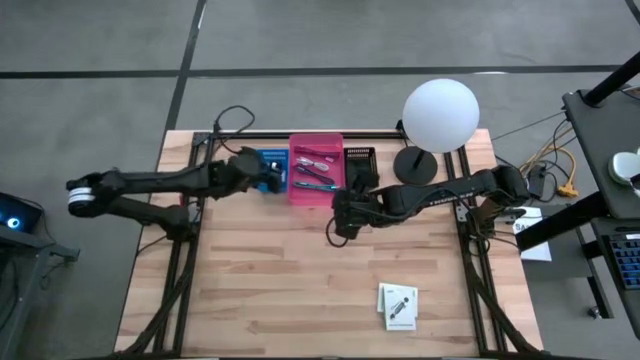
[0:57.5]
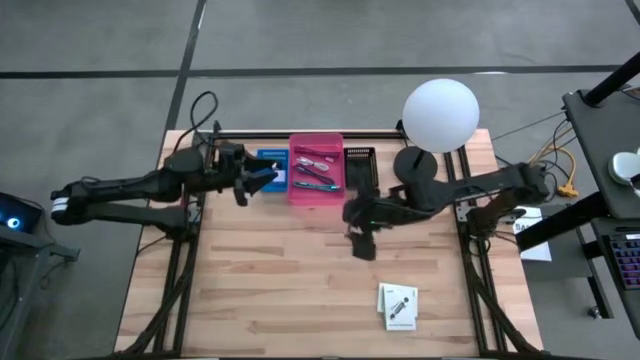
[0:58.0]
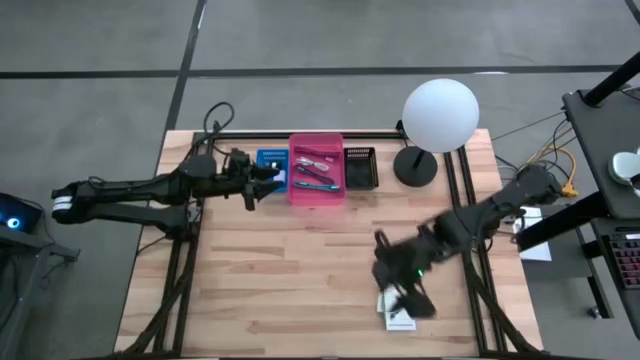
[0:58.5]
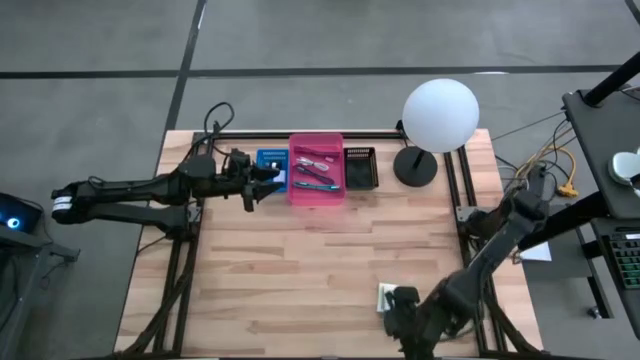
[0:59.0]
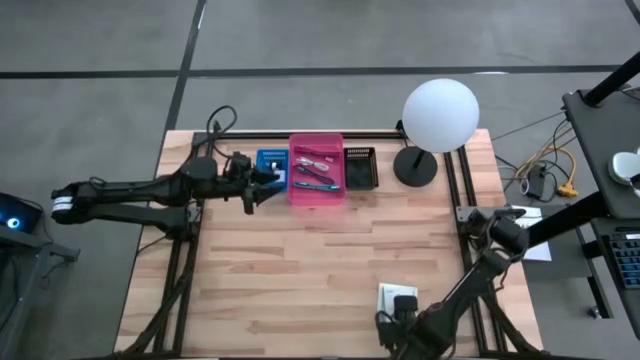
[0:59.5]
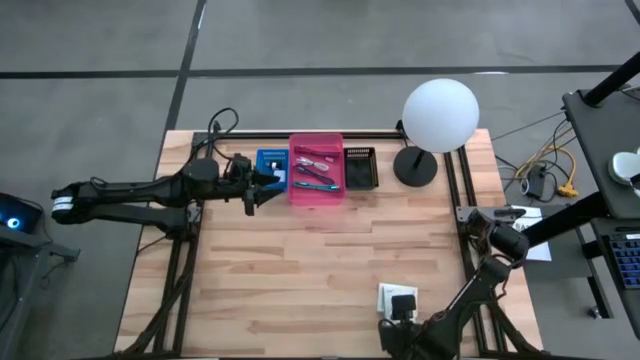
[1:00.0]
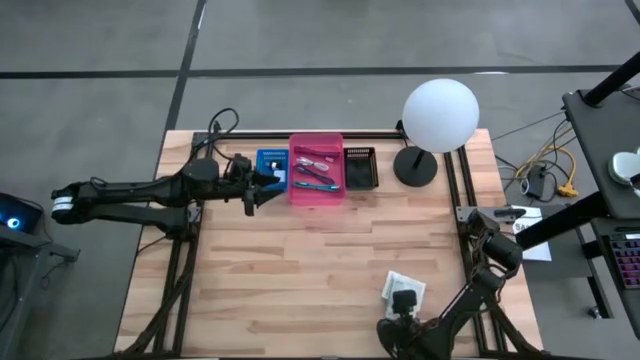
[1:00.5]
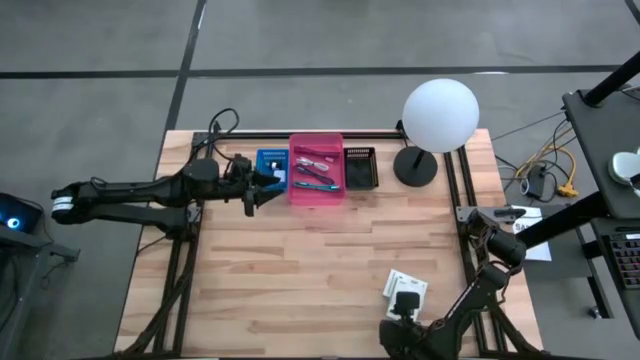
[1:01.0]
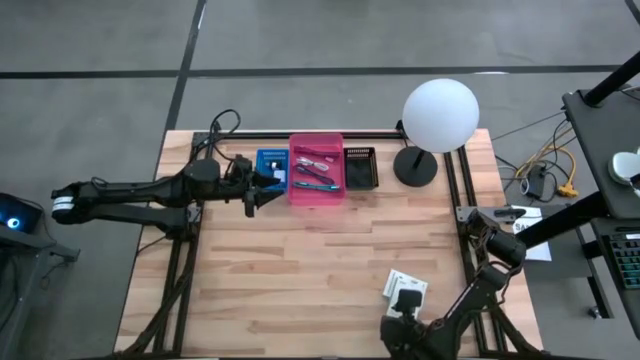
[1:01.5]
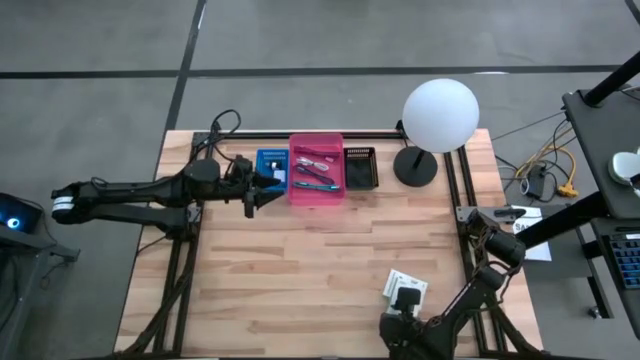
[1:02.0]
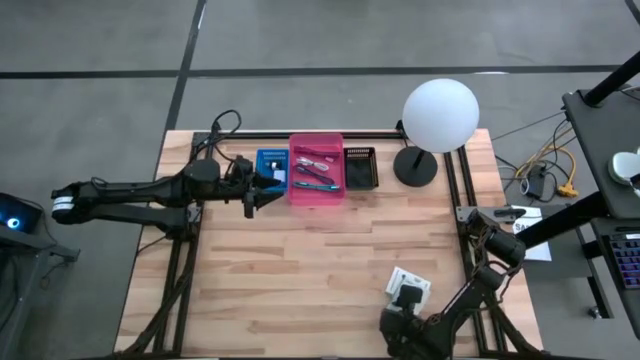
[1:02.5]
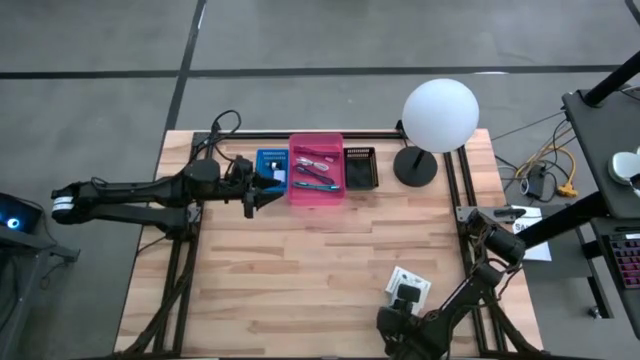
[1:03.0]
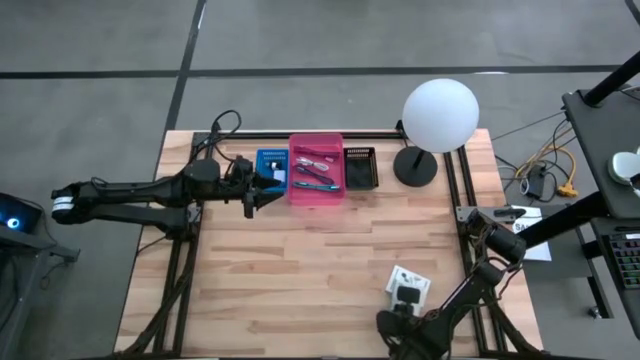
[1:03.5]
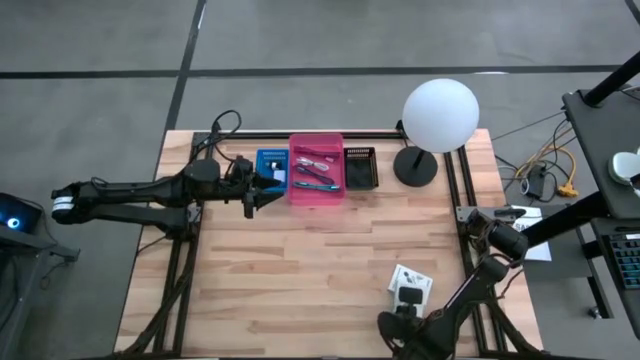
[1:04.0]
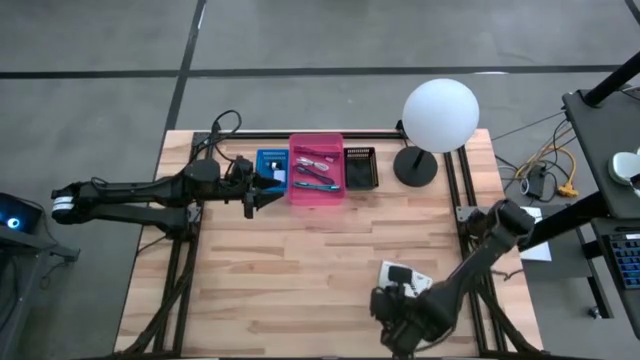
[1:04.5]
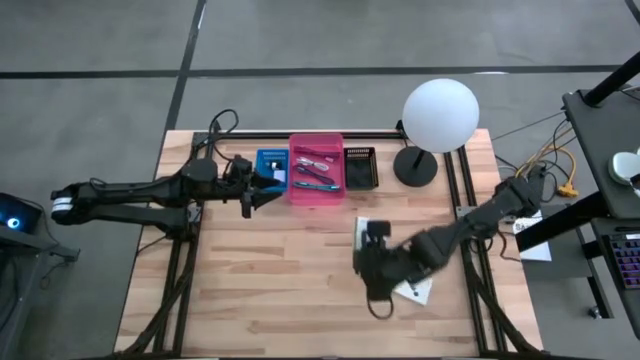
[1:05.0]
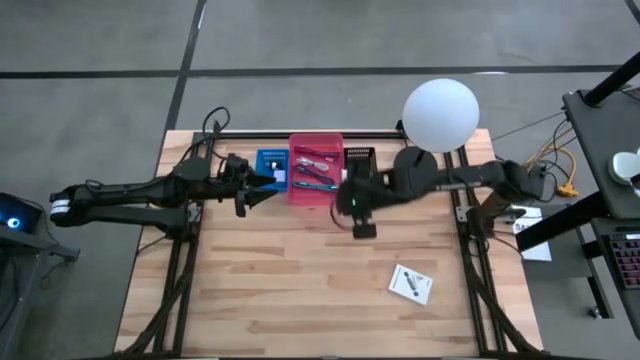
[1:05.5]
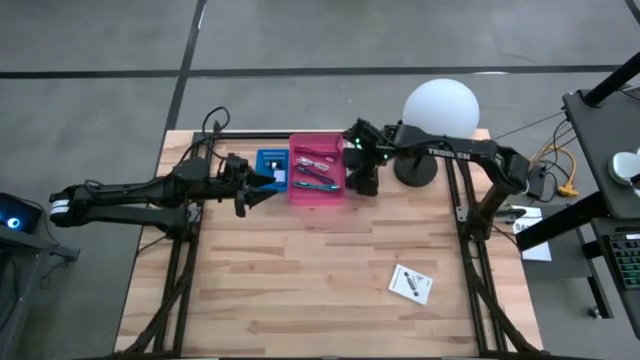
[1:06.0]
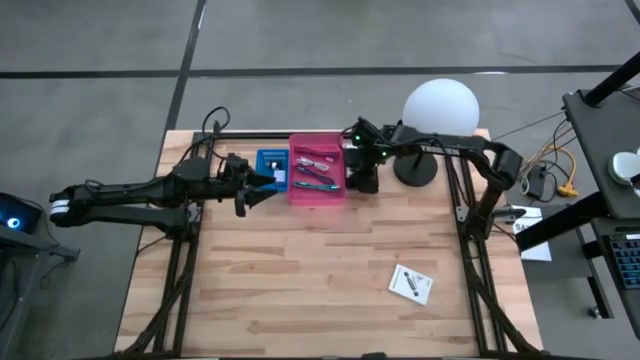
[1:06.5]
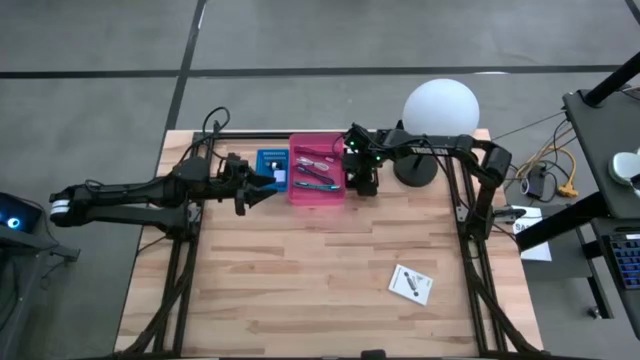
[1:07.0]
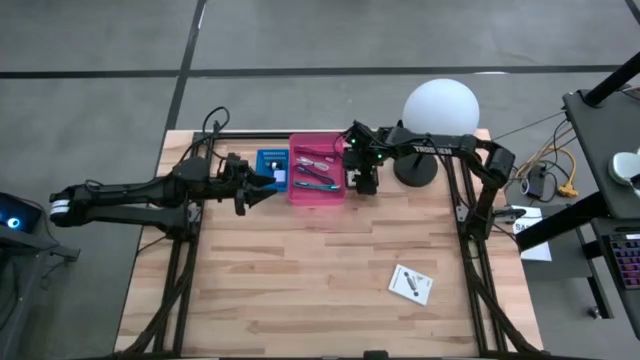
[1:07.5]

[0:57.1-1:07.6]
Task: Pick and place items into bin
Put the white card reader box into the black bin

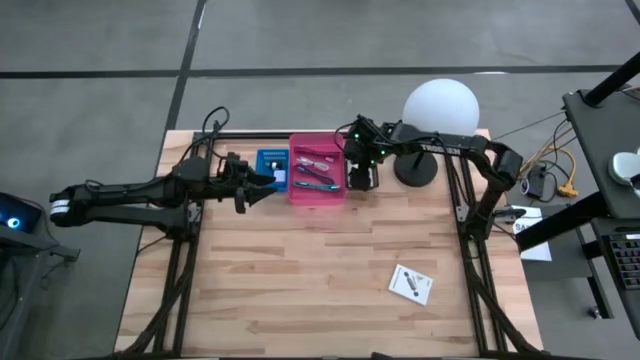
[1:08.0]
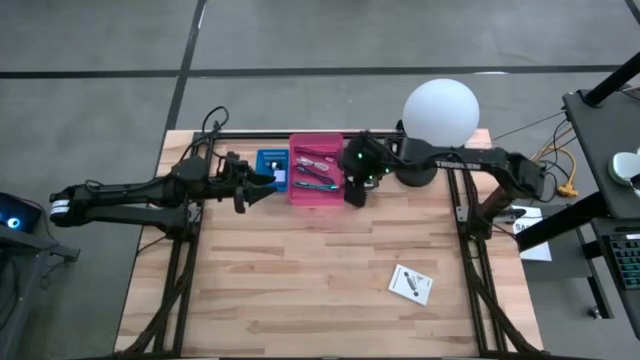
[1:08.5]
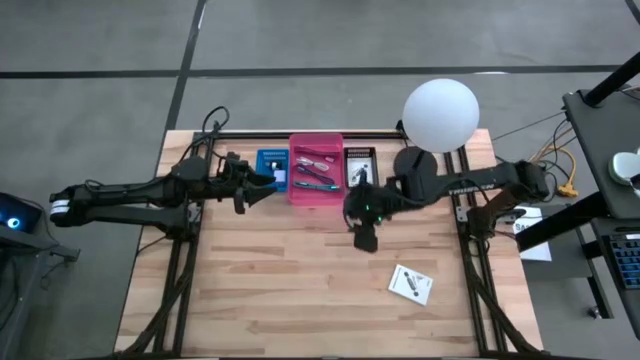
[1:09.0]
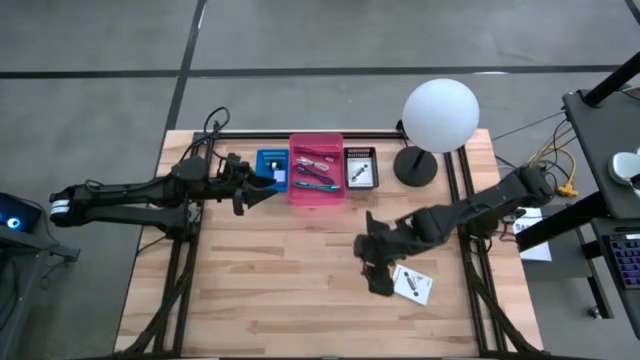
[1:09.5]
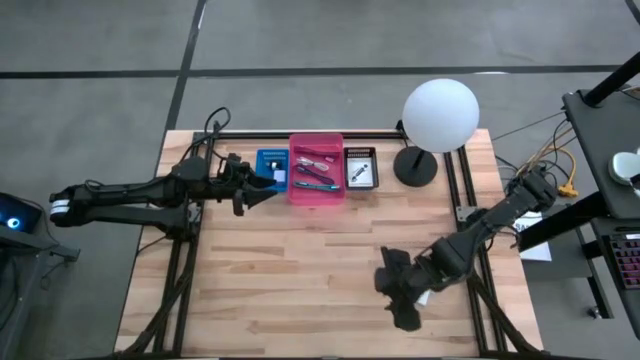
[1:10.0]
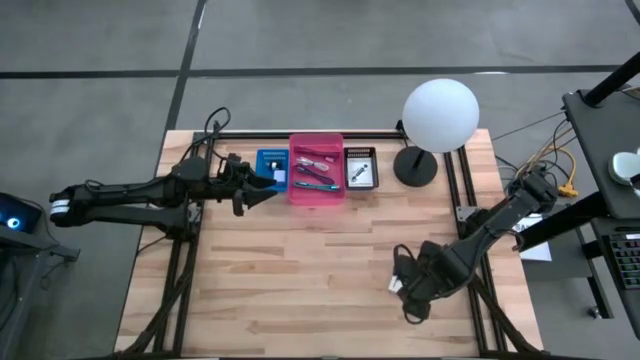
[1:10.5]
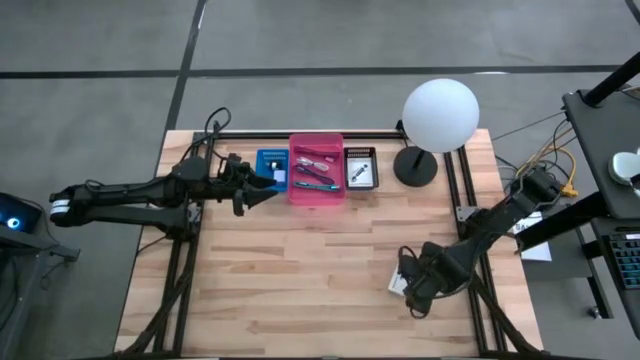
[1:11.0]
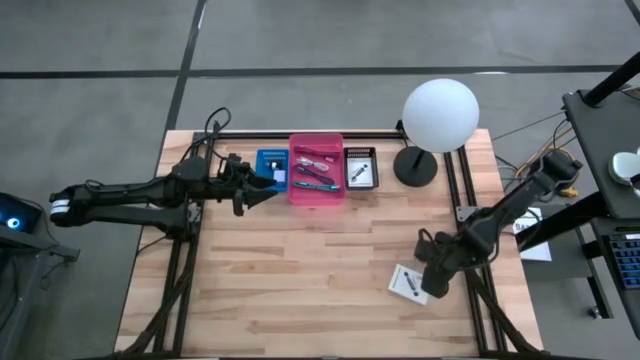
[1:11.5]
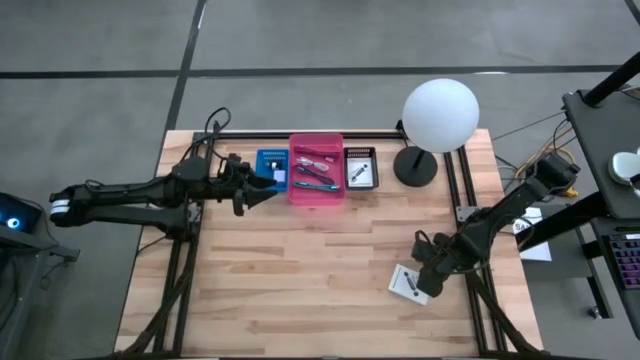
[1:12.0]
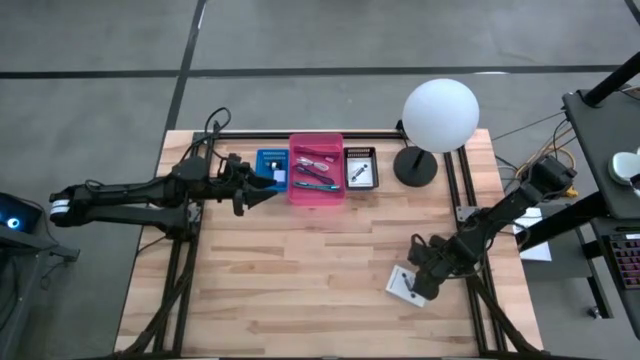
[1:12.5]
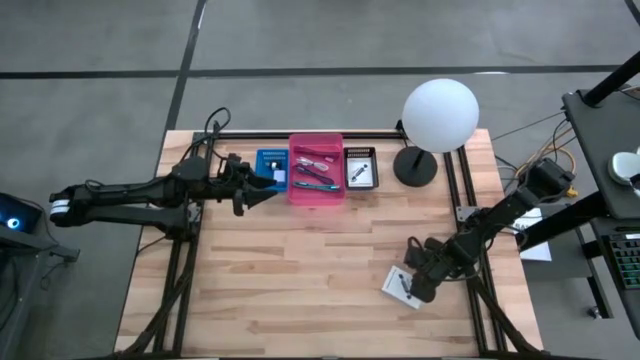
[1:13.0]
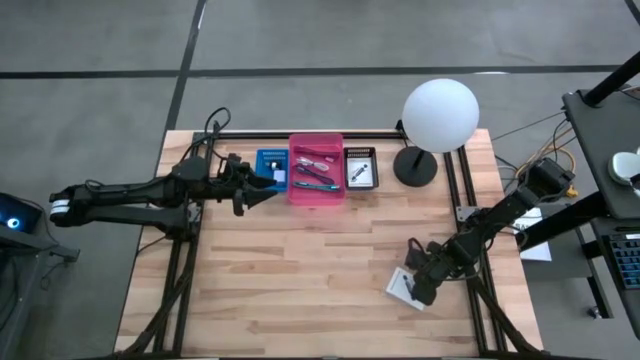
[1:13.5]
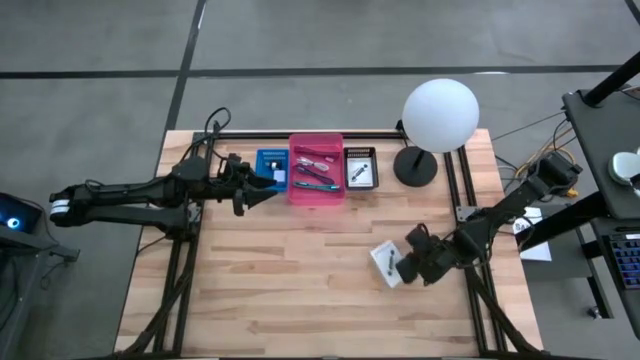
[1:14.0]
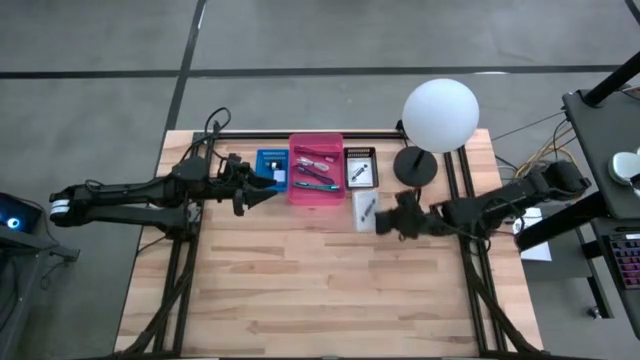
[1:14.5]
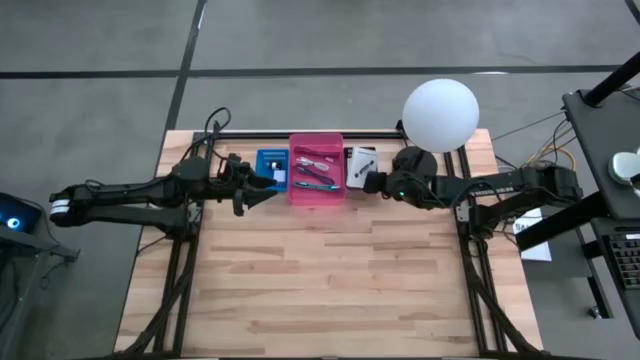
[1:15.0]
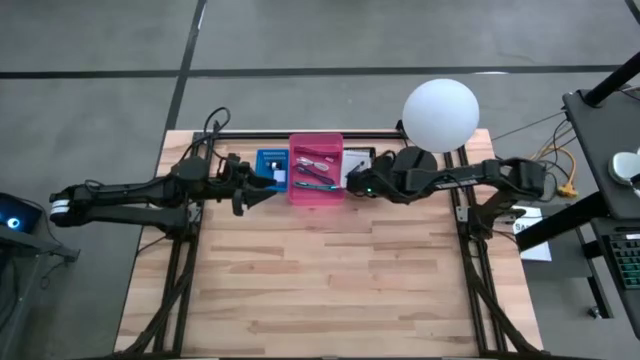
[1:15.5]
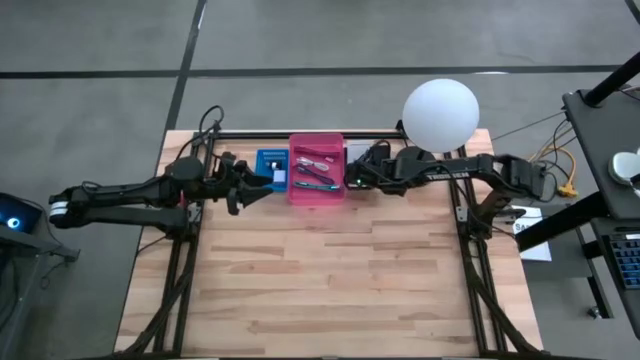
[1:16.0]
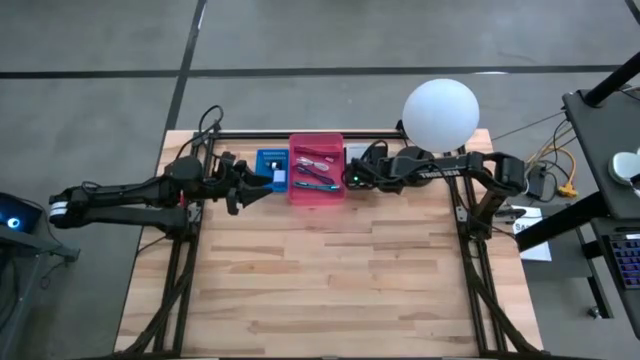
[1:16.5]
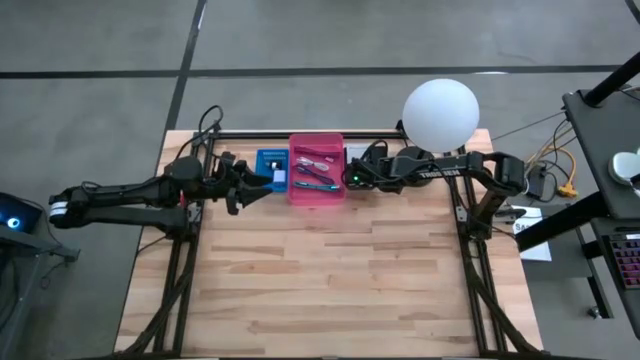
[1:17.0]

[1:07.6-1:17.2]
Put the white card reader box into the black bin
